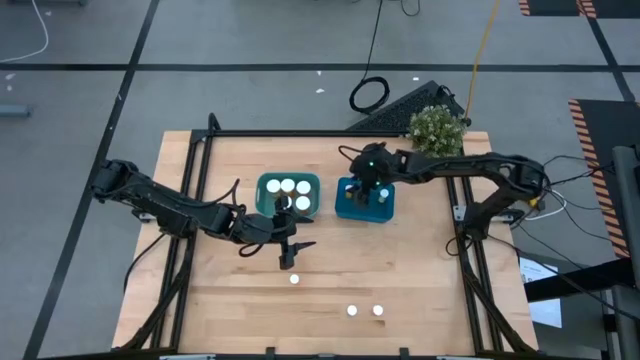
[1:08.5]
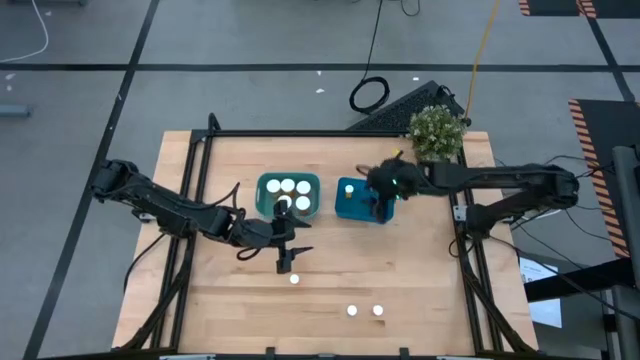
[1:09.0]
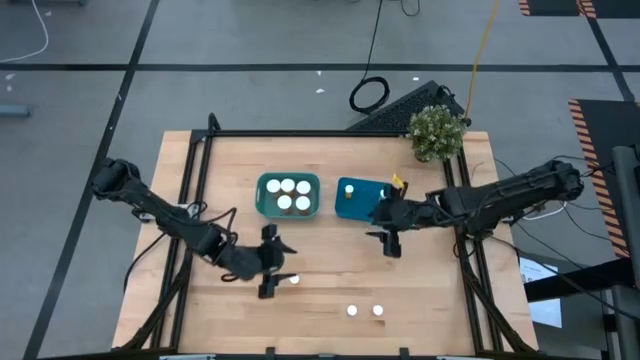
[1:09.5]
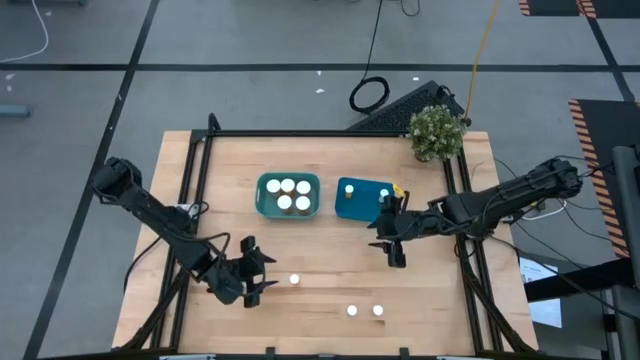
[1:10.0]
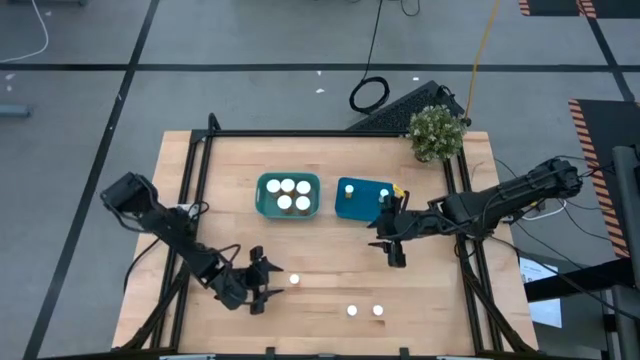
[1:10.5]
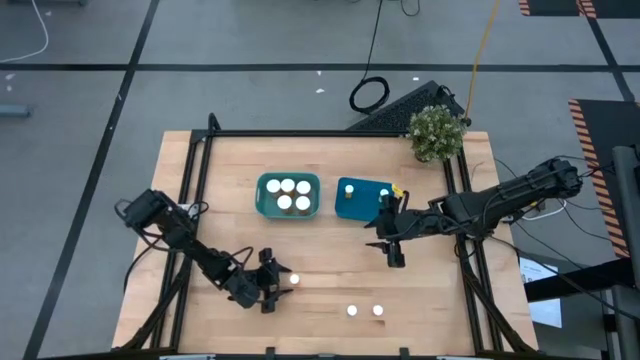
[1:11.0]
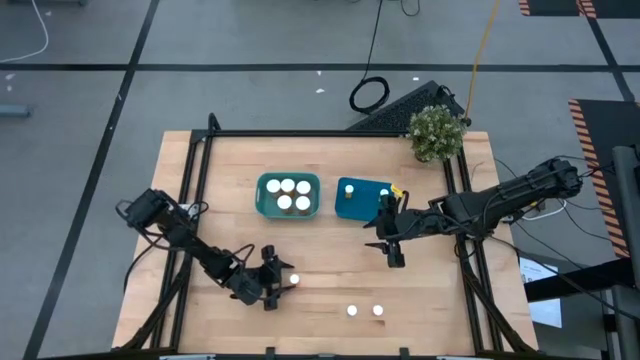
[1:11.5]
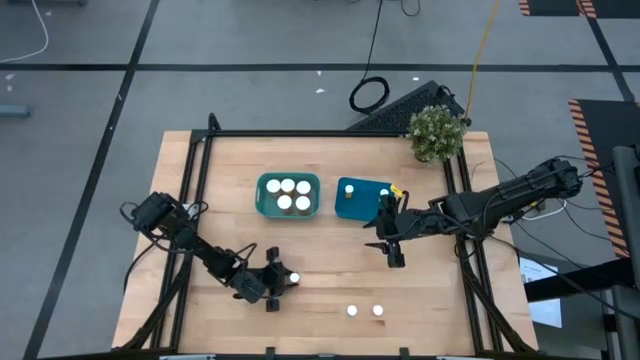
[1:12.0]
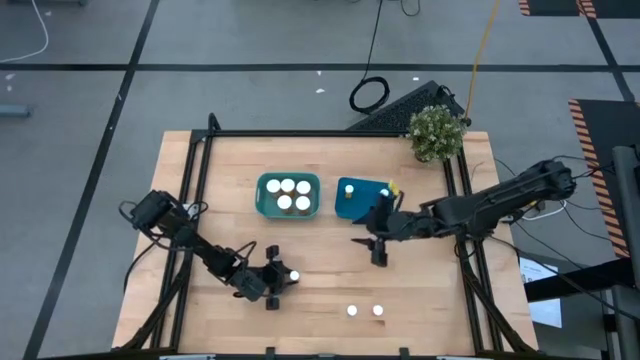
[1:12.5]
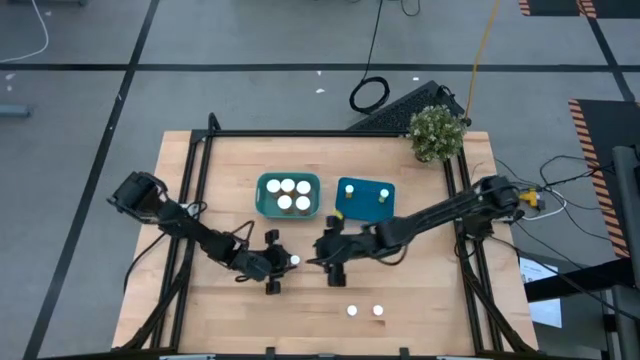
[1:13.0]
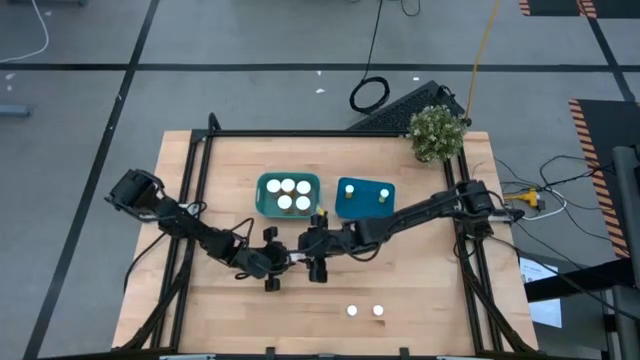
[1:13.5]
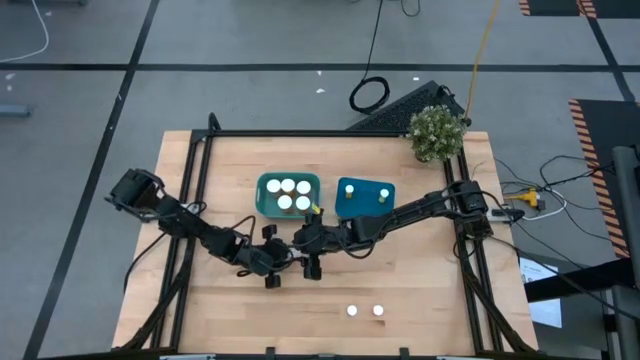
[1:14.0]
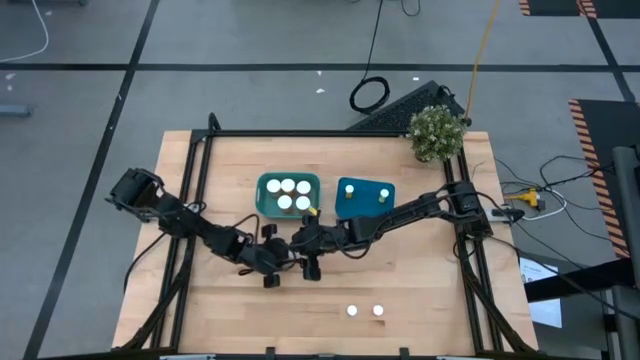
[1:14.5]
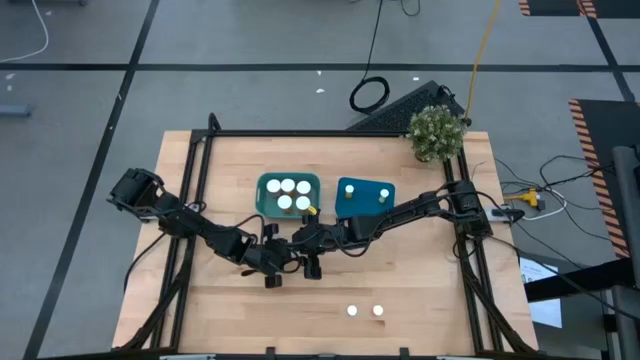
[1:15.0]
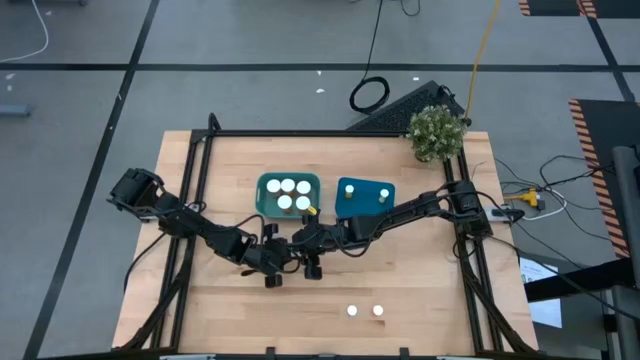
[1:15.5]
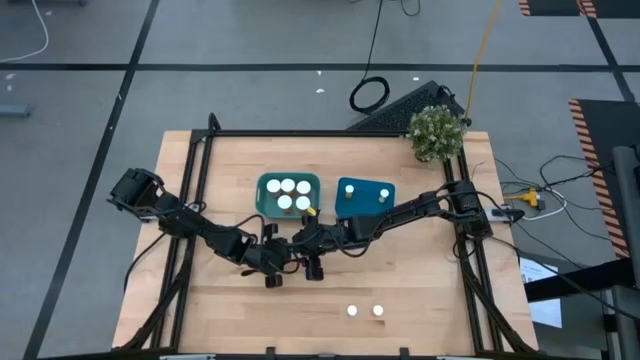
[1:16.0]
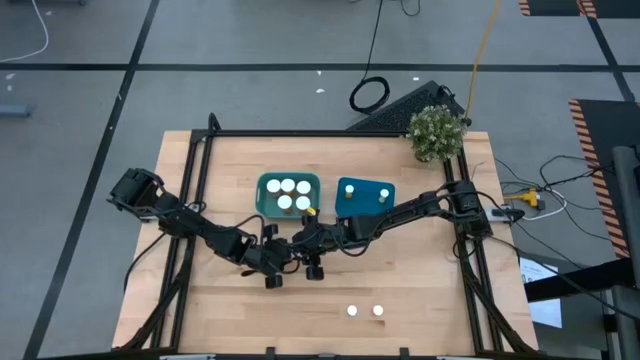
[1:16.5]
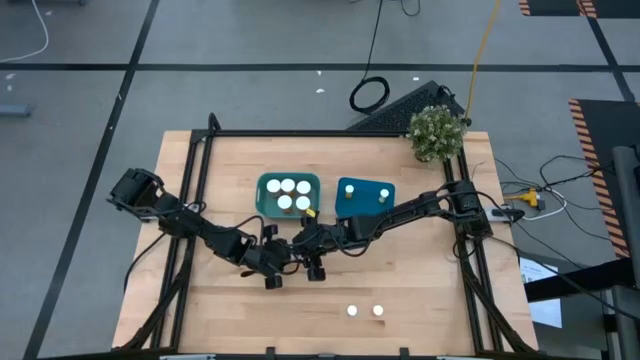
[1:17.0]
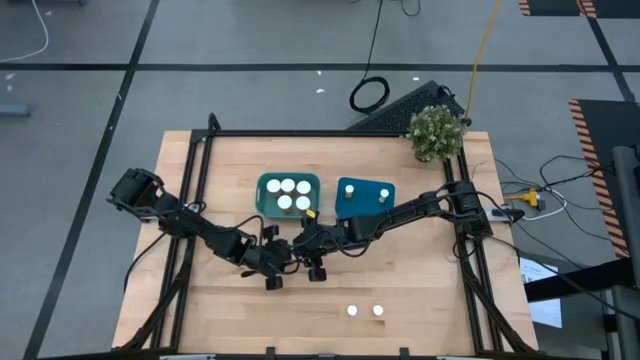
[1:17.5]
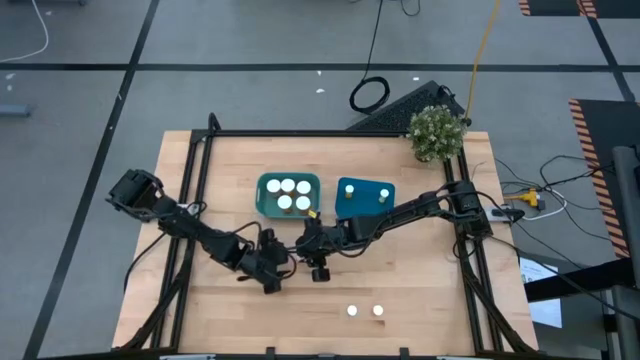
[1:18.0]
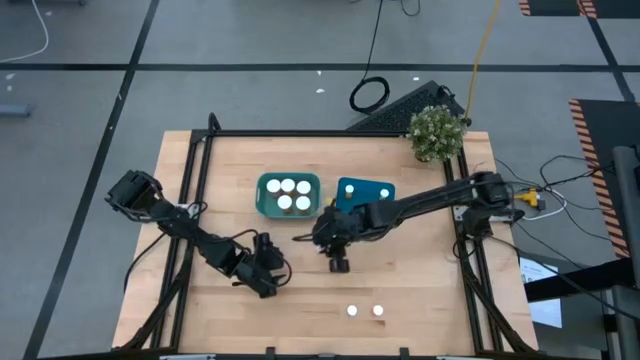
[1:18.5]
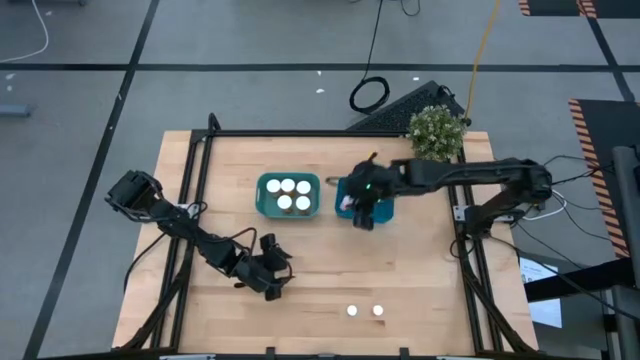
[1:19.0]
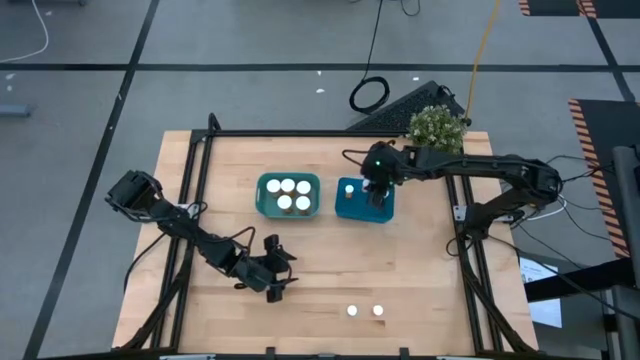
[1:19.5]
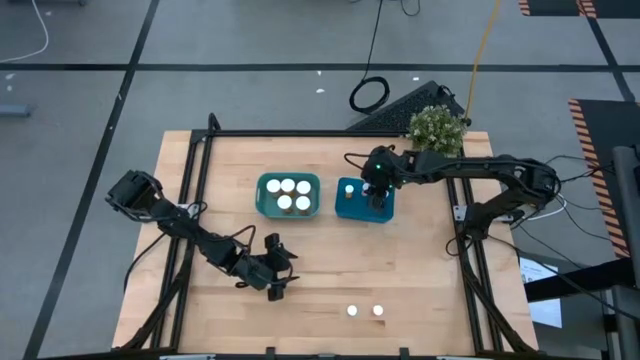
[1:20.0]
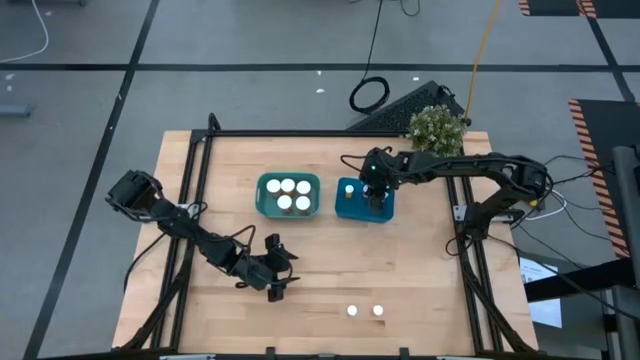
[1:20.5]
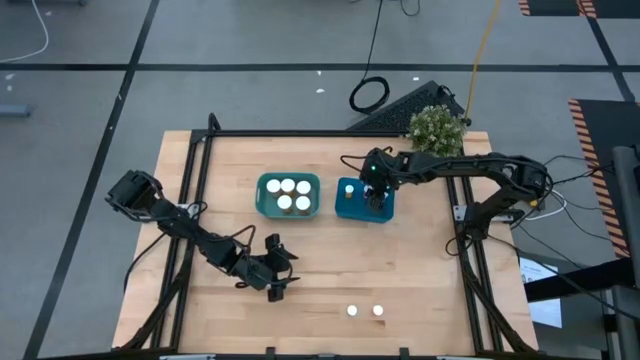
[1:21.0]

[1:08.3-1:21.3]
Task: Pick and place medicine bottles into bin by pill shape (circle, oval)
Put the top small pink tablet bottle into the blue bin

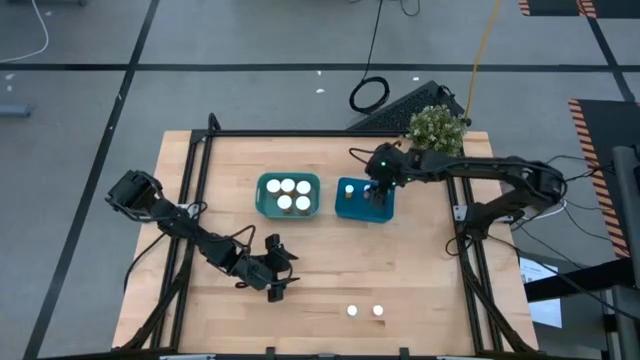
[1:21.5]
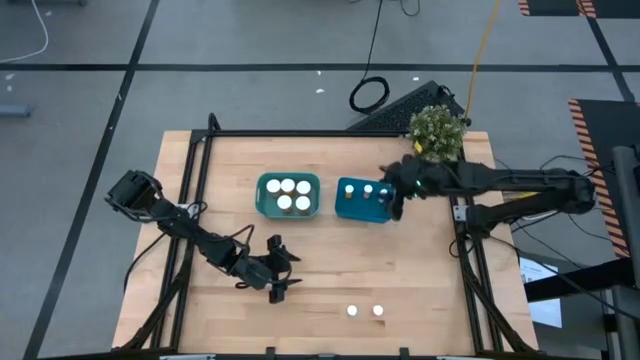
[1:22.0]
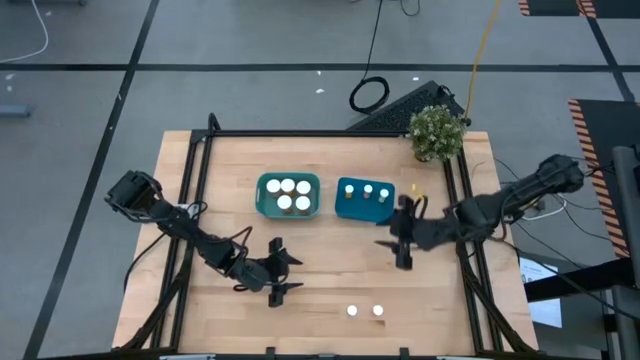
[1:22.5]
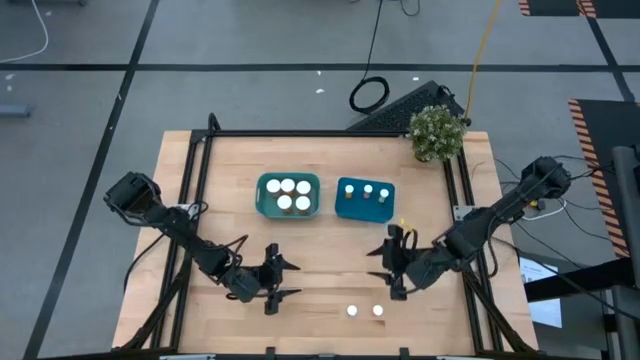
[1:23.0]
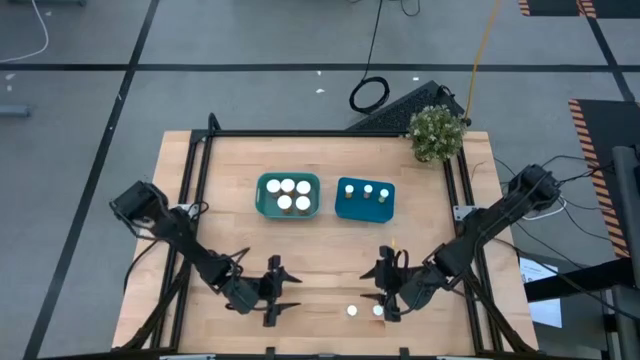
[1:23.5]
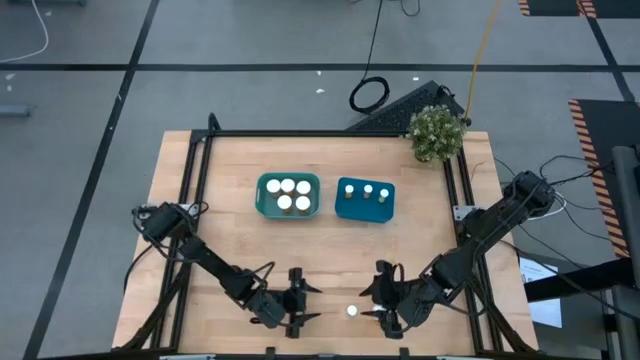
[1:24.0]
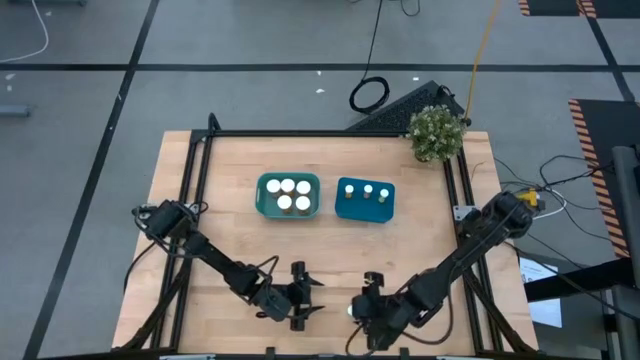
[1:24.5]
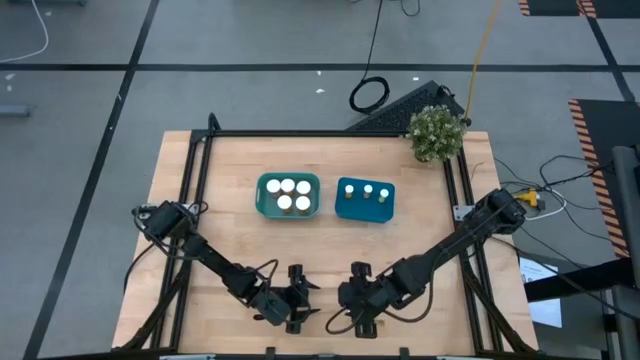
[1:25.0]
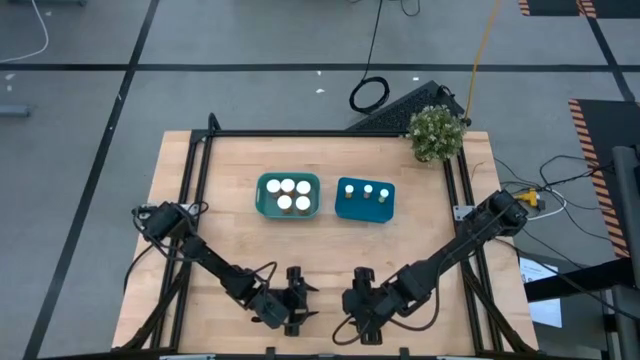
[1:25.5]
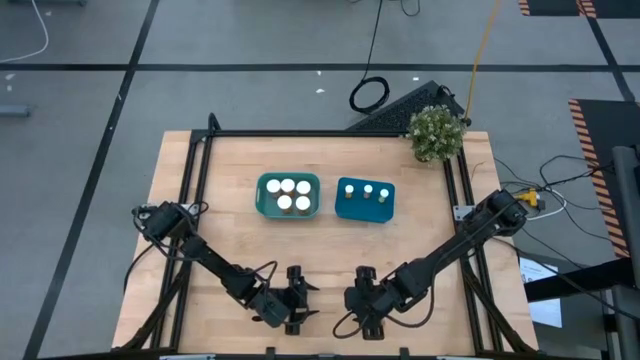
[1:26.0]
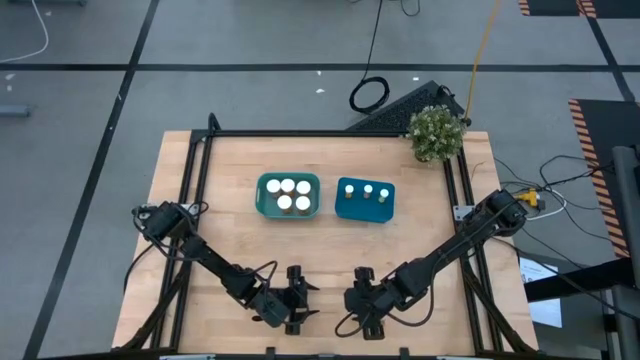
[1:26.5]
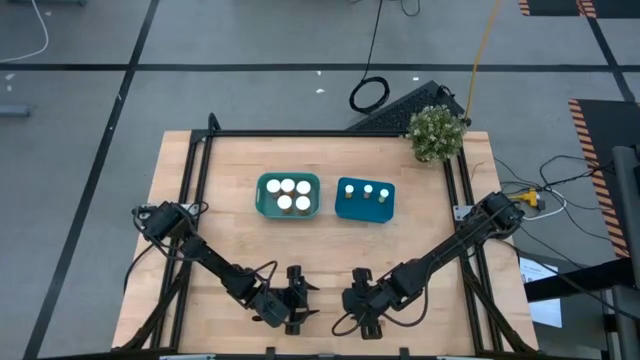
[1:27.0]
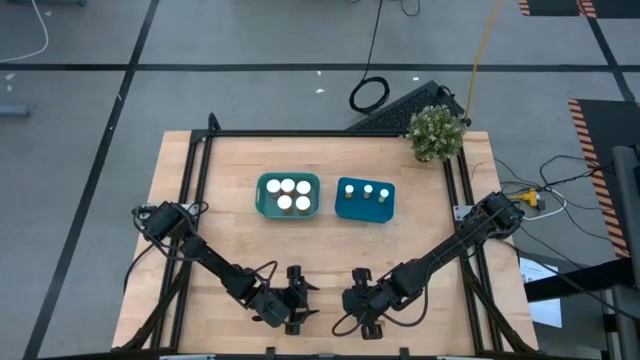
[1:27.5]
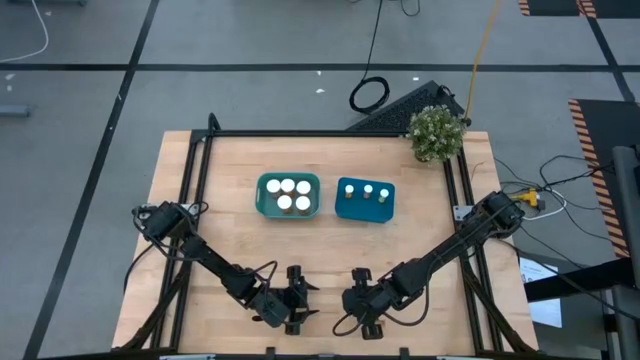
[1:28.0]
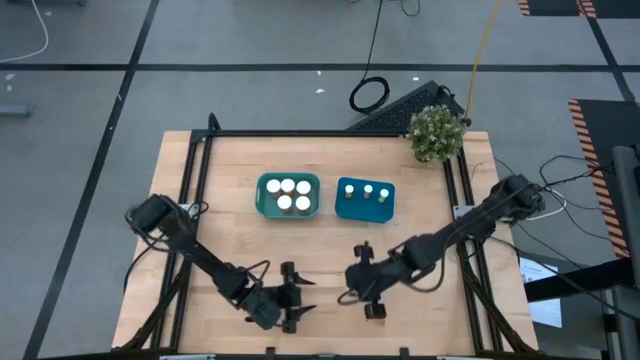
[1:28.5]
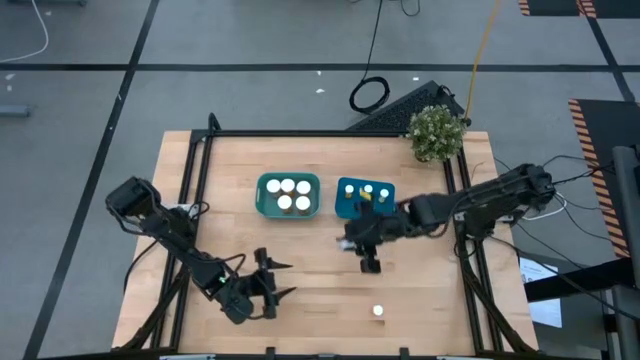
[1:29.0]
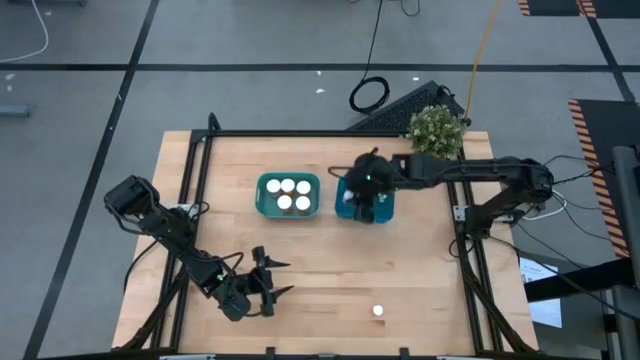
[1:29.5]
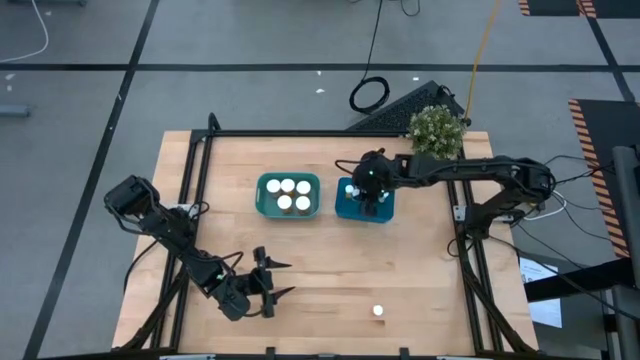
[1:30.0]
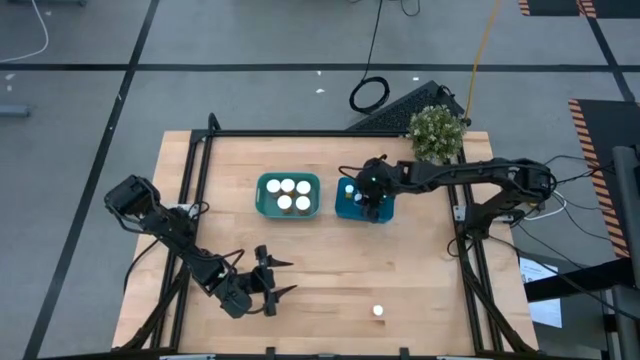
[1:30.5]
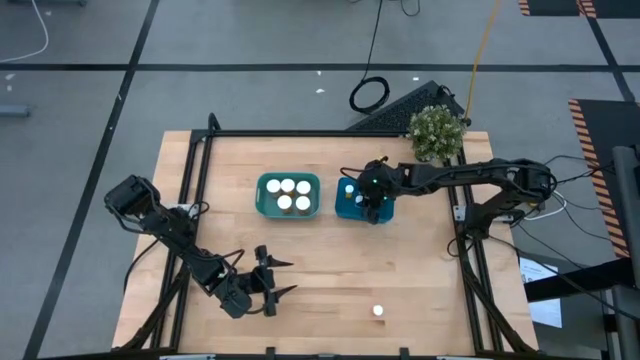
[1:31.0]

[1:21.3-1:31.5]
Put the small blue tablet bottle into the blue bin
